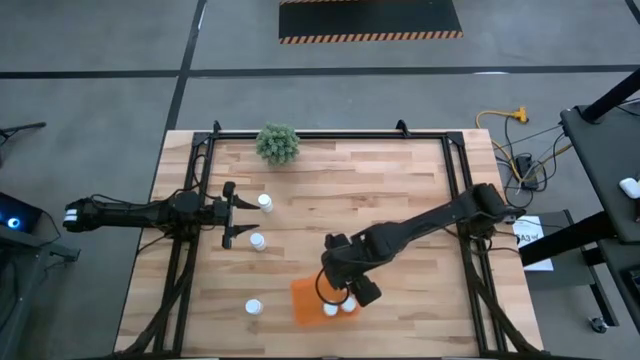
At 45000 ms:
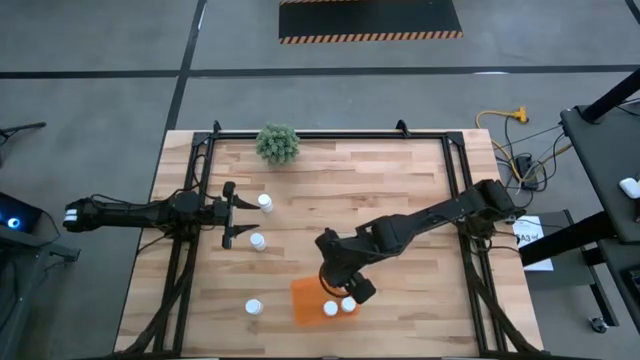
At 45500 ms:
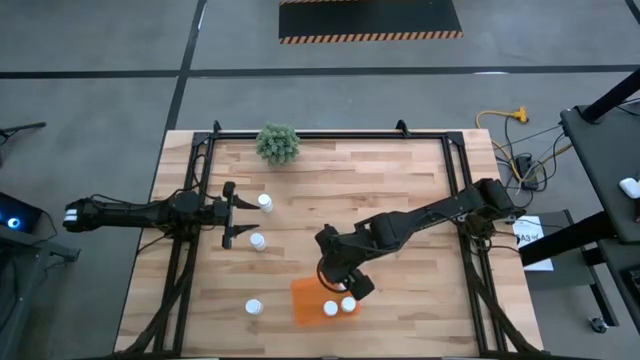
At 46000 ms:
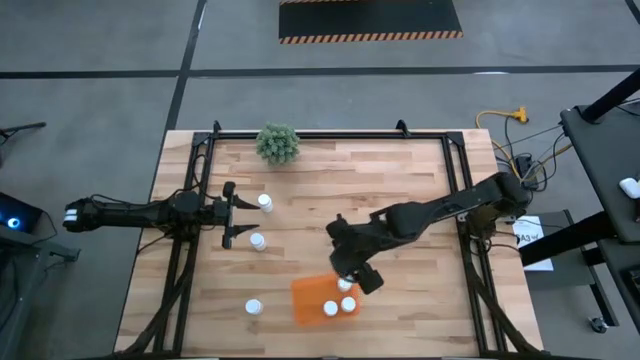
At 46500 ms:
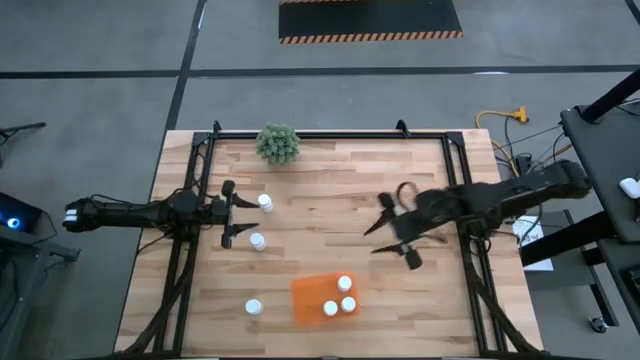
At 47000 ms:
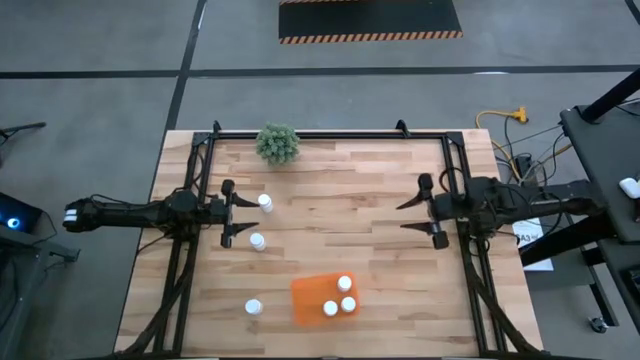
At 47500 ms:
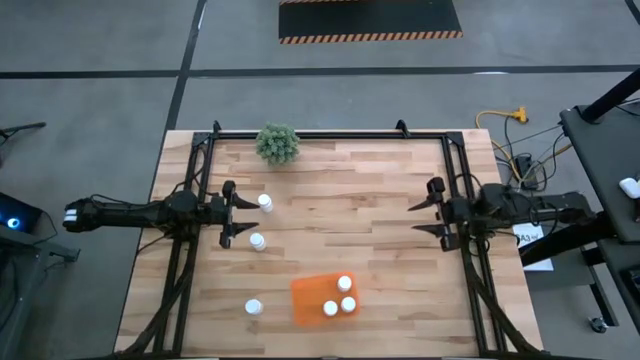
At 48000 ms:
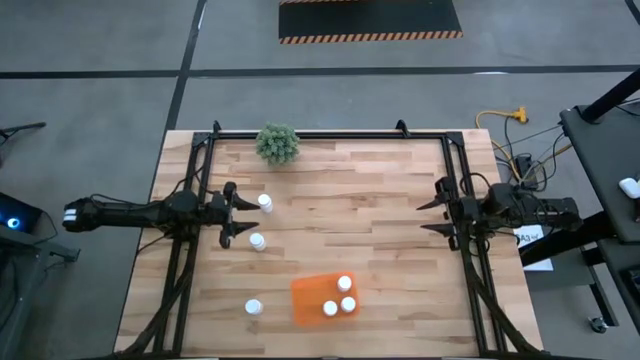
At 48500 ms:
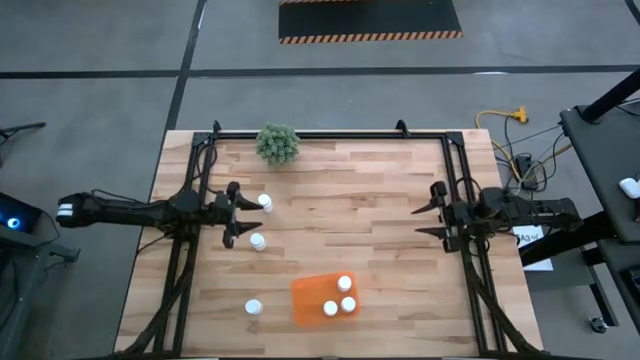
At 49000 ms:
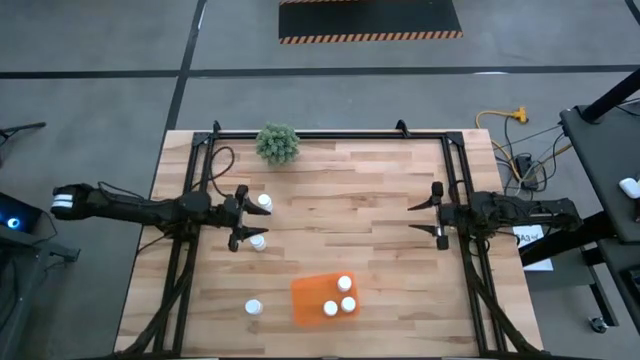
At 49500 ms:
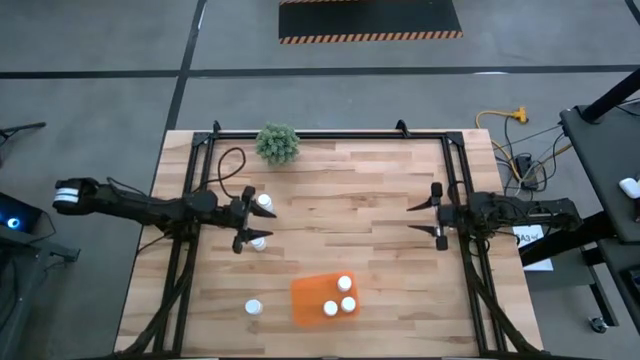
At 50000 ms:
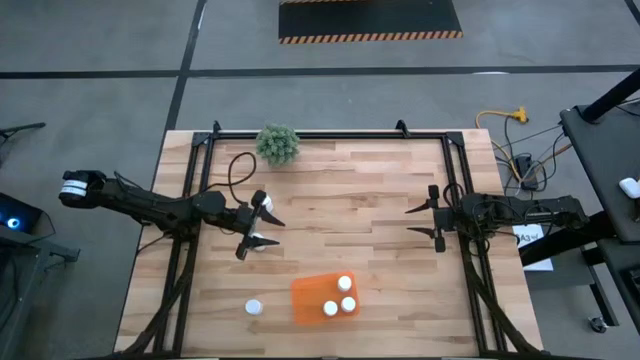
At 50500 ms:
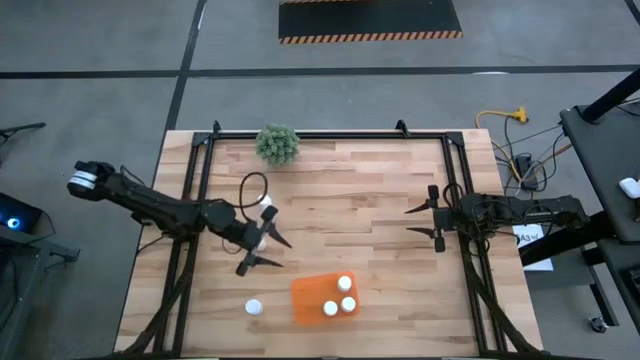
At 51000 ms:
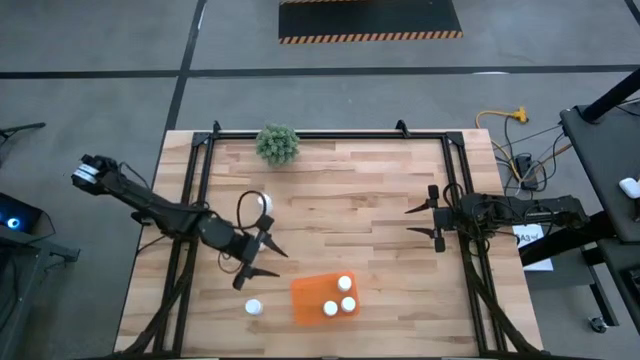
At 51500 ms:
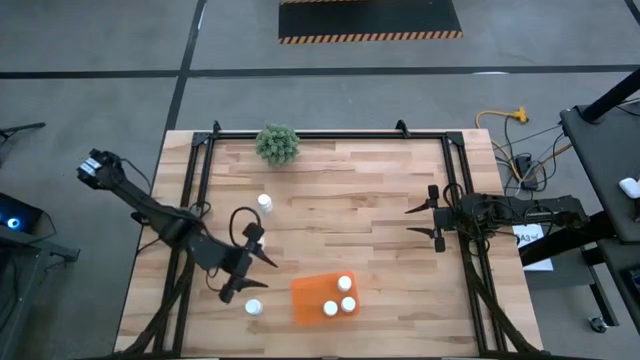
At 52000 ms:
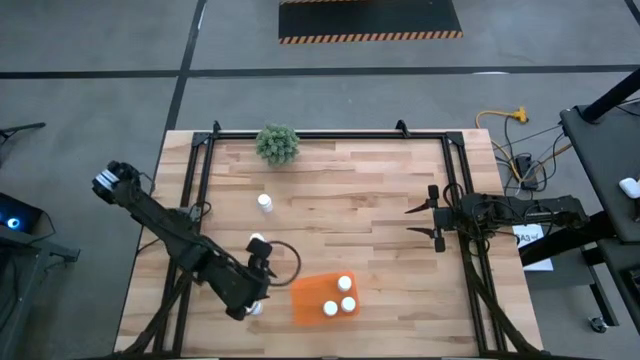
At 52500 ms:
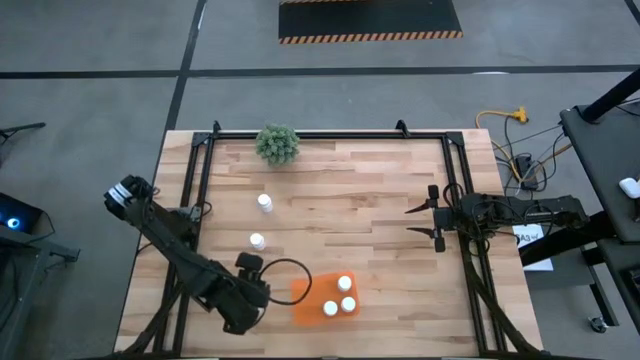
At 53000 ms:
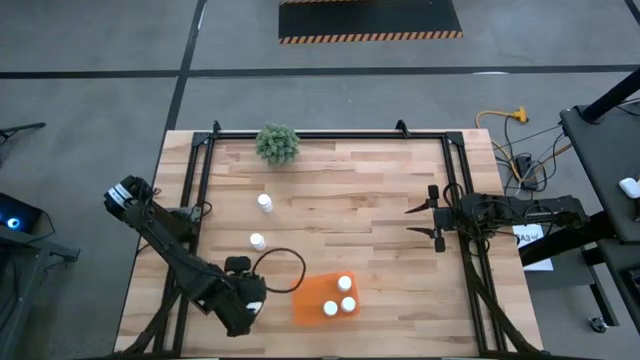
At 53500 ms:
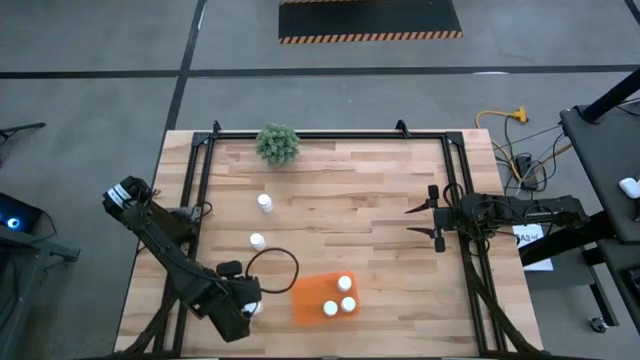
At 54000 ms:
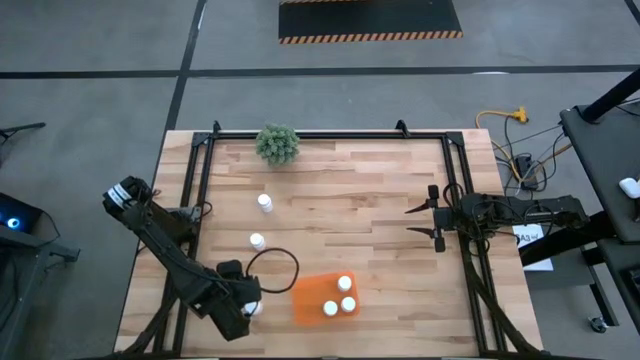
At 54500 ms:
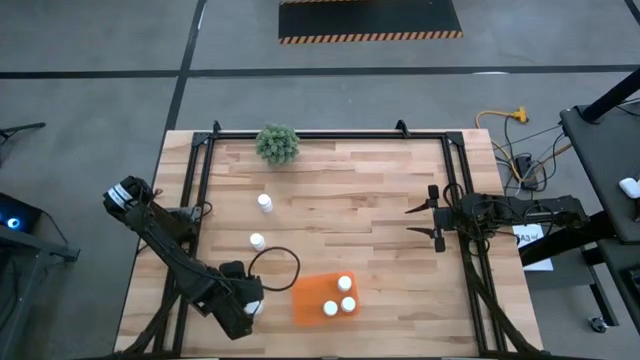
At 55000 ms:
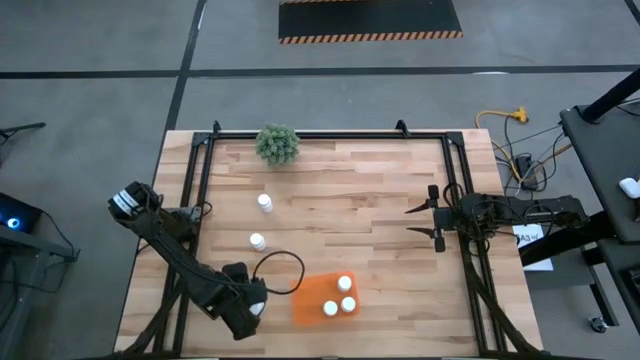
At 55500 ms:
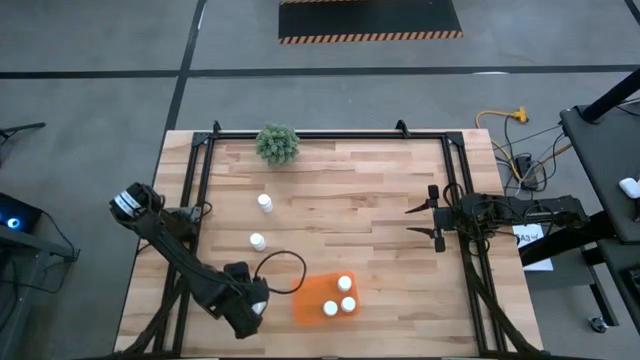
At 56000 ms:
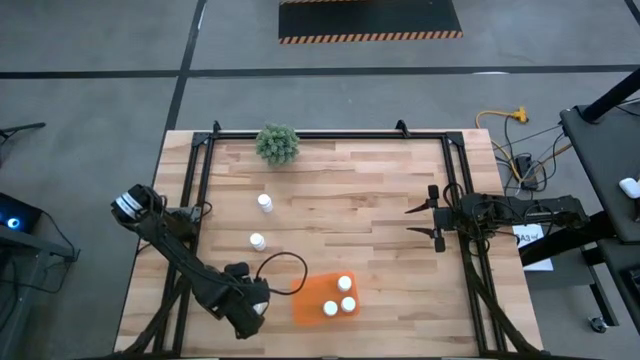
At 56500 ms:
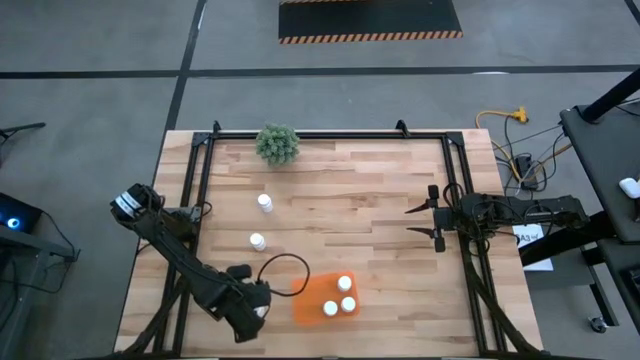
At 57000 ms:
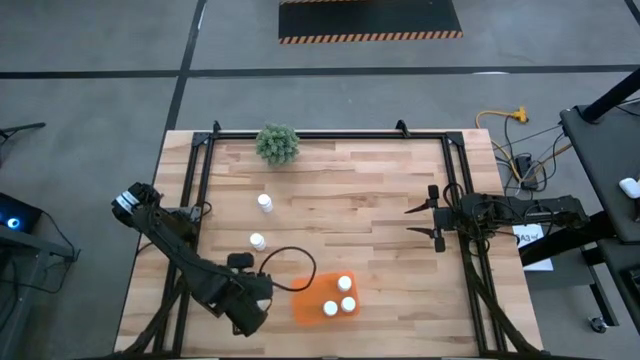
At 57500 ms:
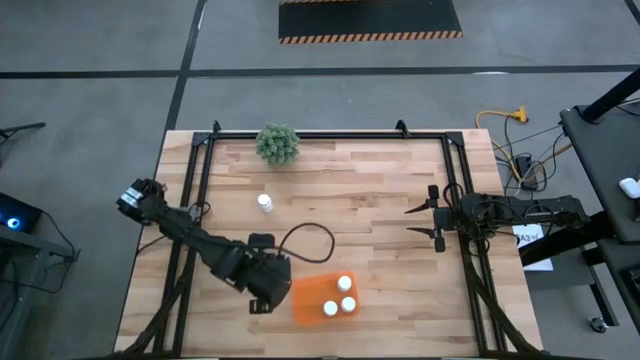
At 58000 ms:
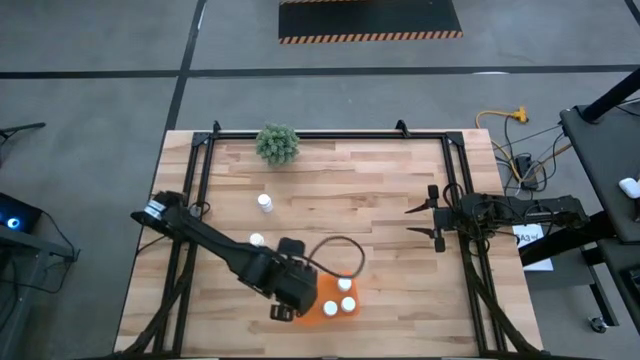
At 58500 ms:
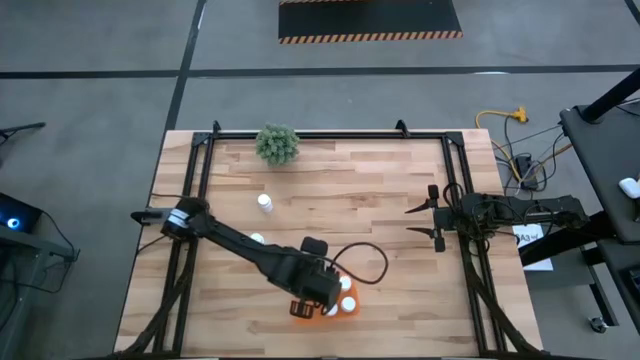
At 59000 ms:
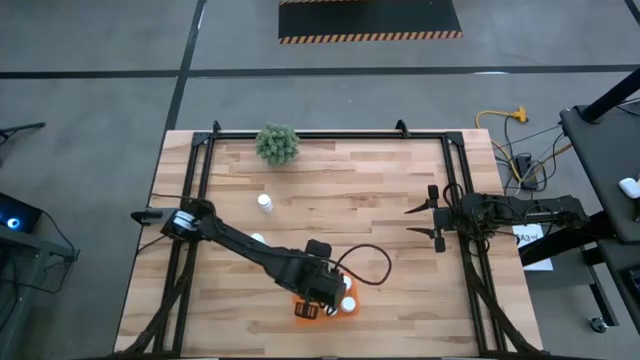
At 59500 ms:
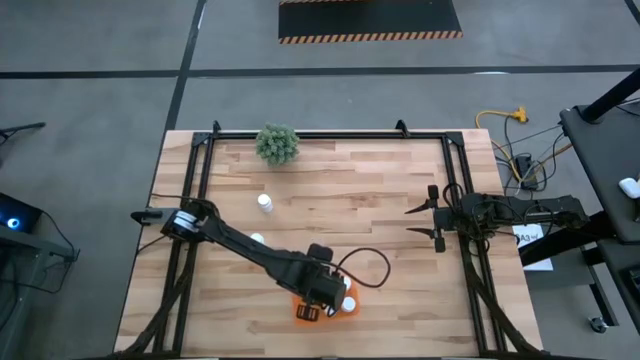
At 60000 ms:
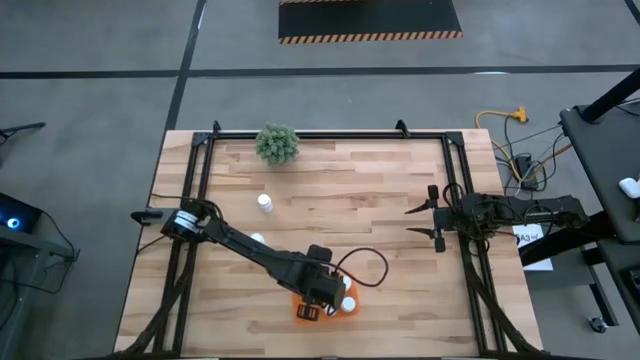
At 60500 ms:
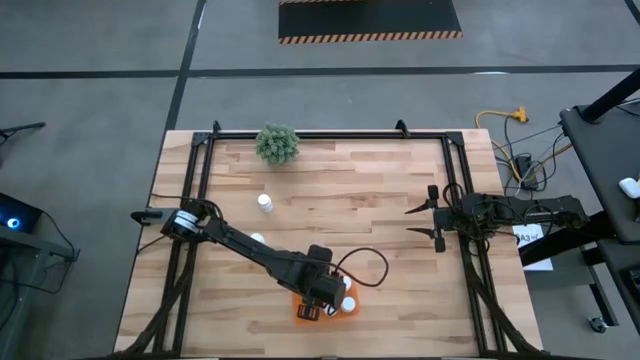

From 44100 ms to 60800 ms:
Task: Pick and place pill bottles into a basket
Put the bottom pill bottle into the bin

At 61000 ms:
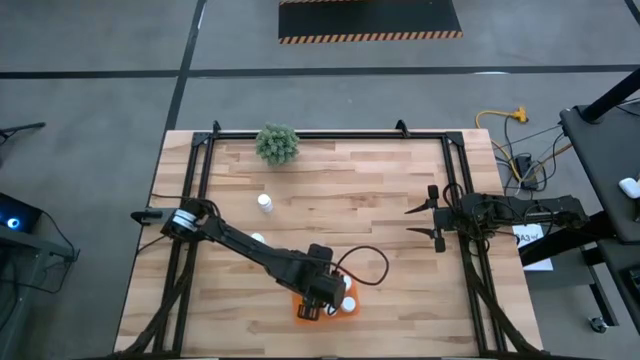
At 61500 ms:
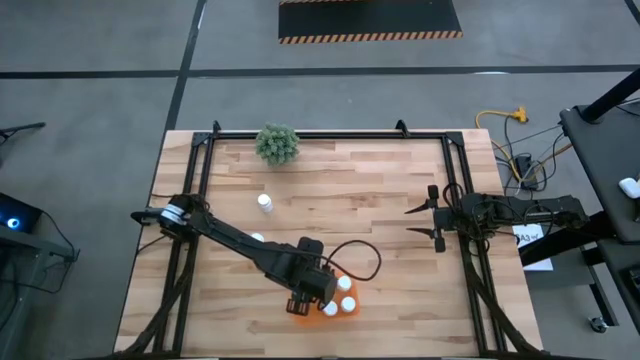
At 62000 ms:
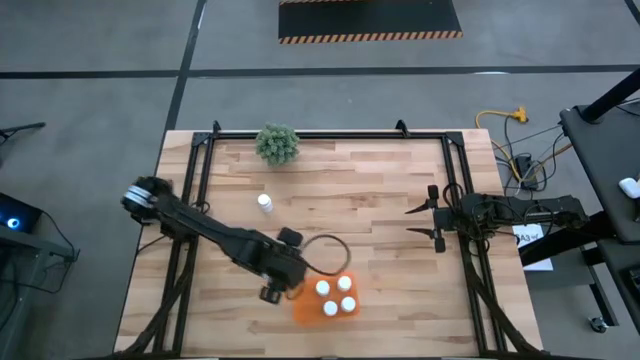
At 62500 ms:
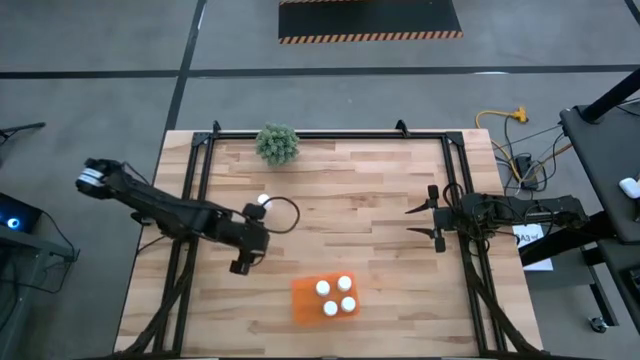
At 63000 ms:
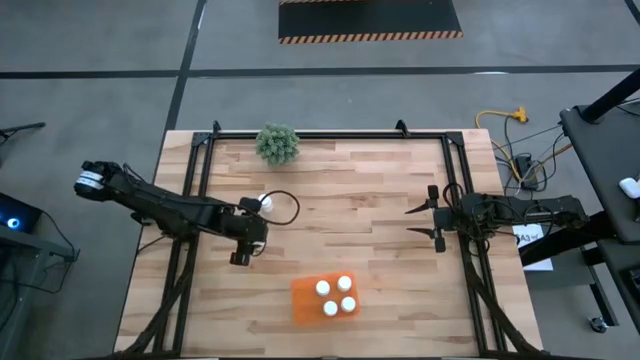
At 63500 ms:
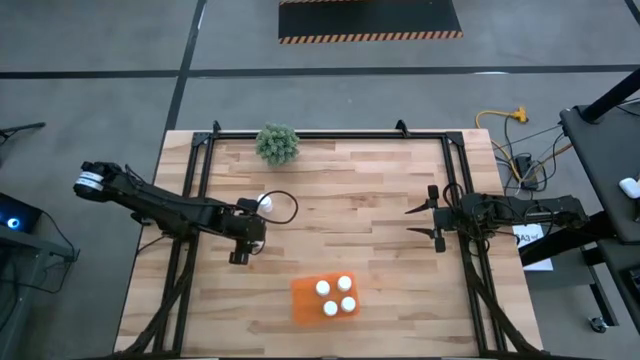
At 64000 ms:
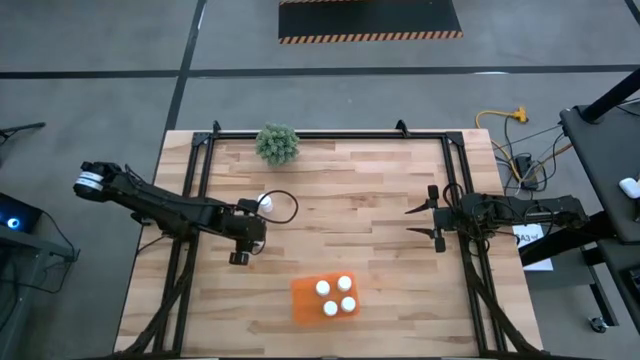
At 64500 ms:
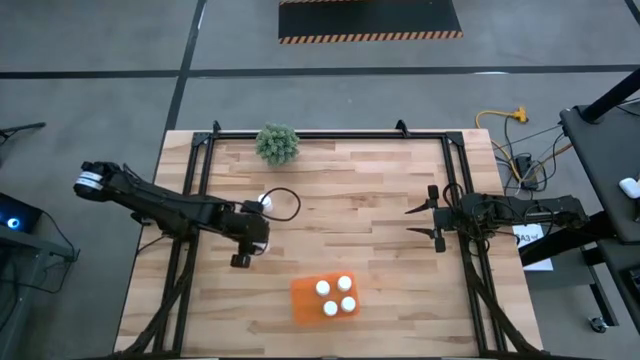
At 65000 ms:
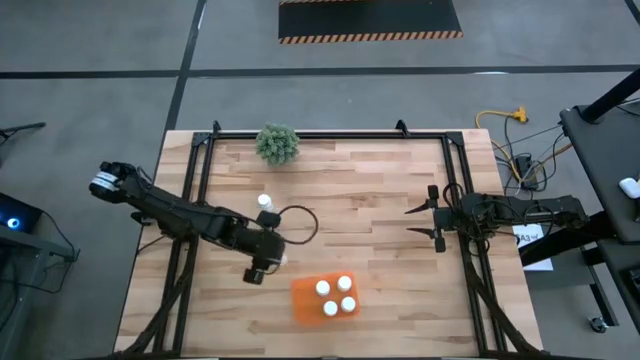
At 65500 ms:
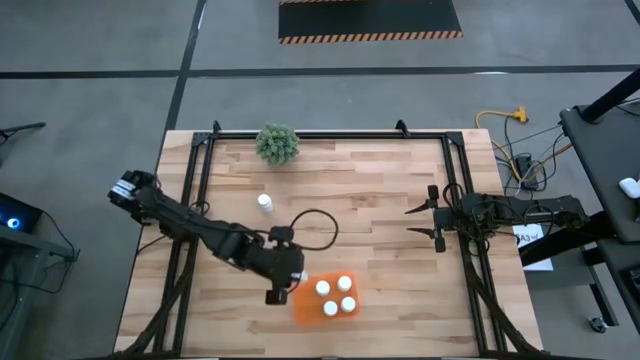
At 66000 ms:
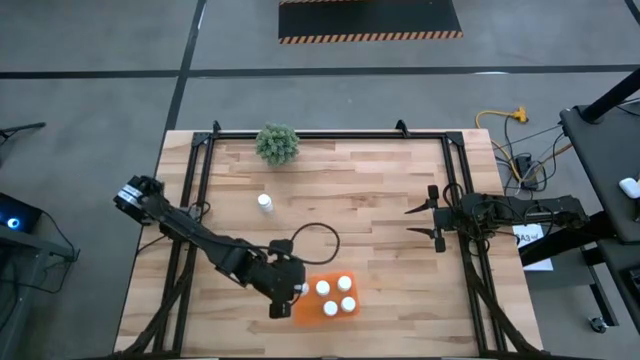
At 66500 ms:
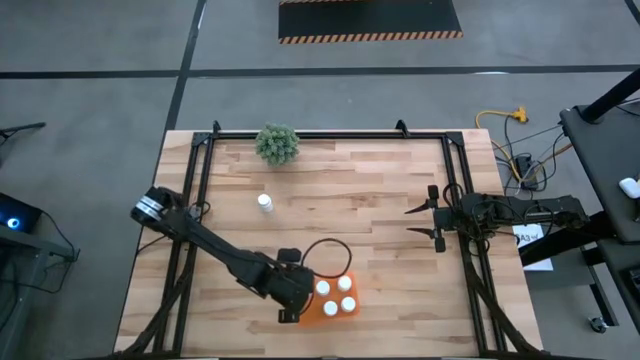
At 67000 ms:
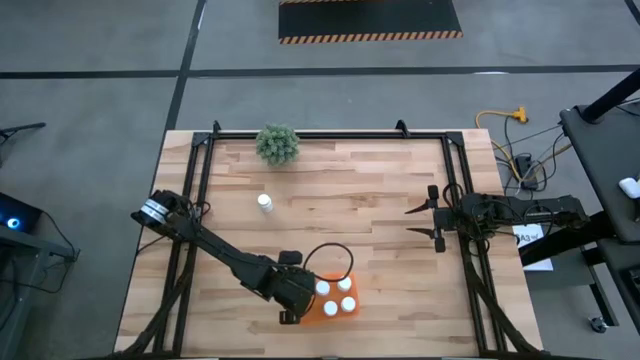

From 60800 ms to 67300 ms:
Put the bottom pill bottle into the bin
